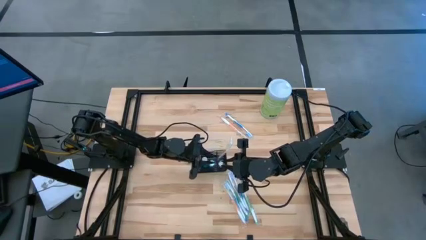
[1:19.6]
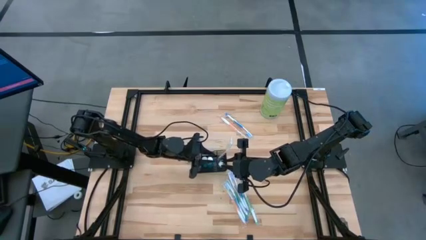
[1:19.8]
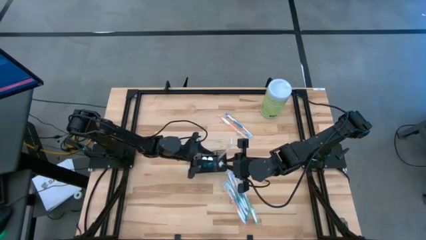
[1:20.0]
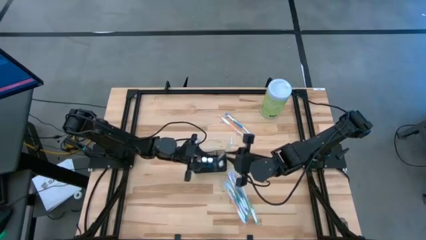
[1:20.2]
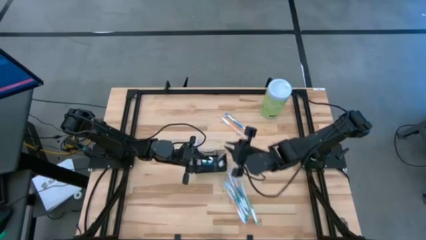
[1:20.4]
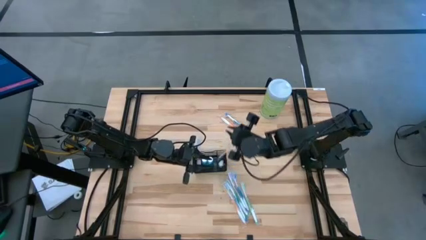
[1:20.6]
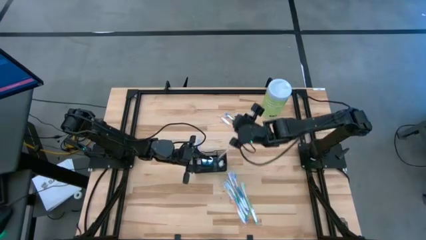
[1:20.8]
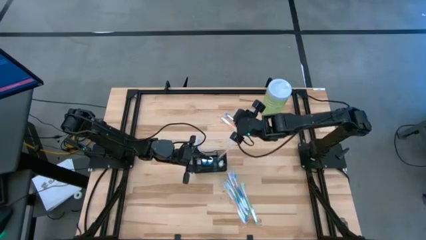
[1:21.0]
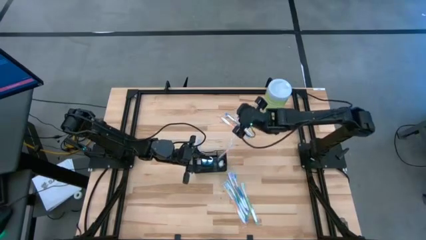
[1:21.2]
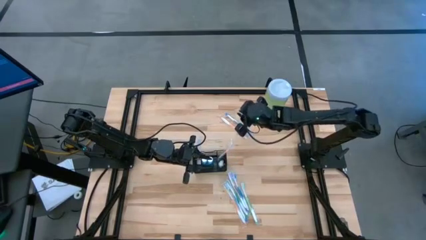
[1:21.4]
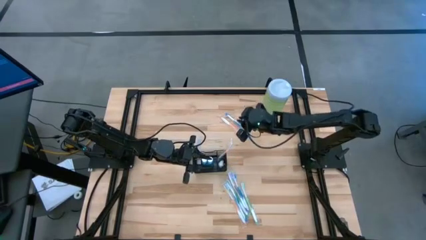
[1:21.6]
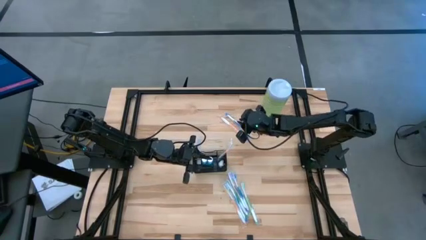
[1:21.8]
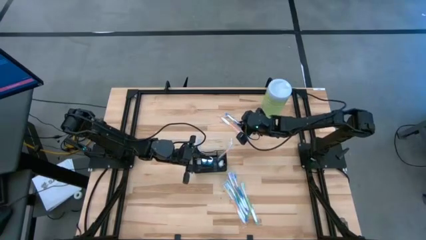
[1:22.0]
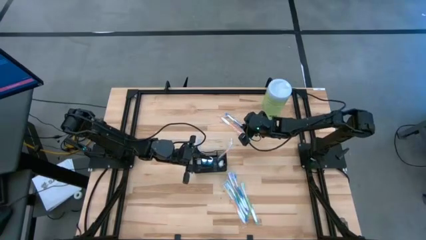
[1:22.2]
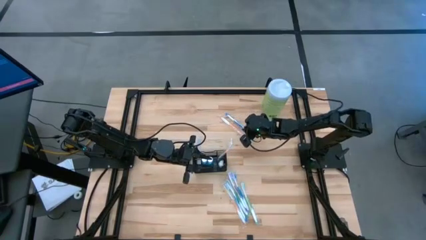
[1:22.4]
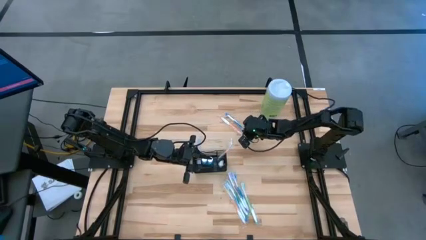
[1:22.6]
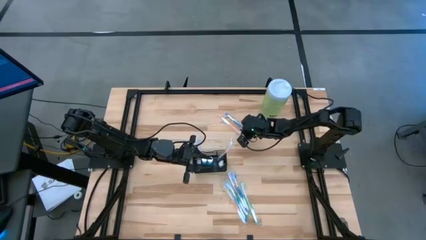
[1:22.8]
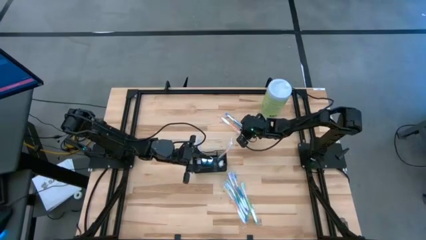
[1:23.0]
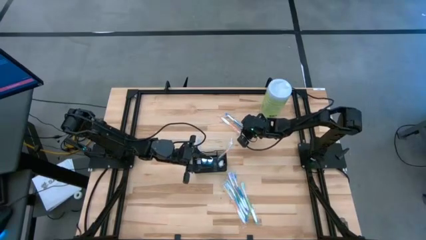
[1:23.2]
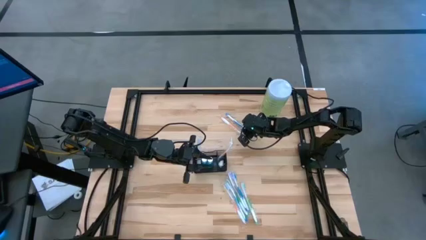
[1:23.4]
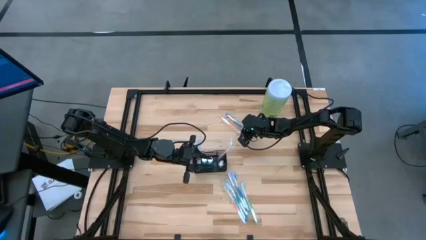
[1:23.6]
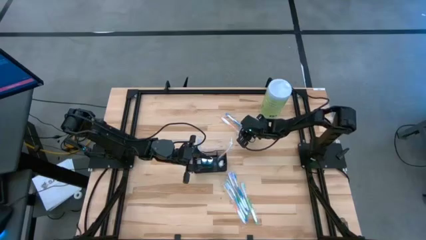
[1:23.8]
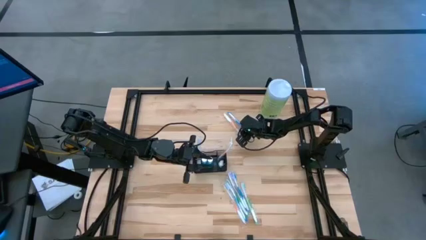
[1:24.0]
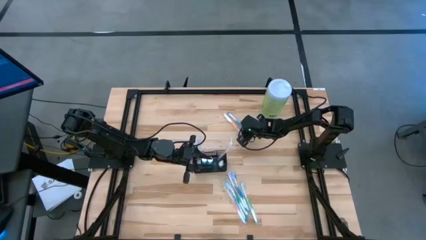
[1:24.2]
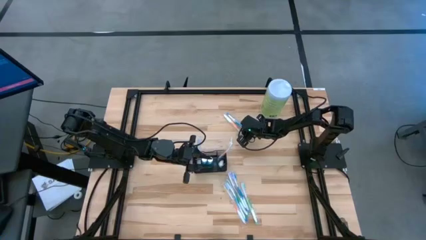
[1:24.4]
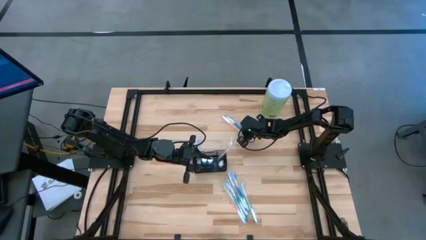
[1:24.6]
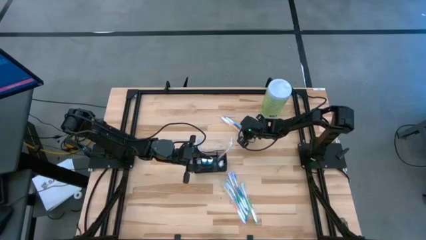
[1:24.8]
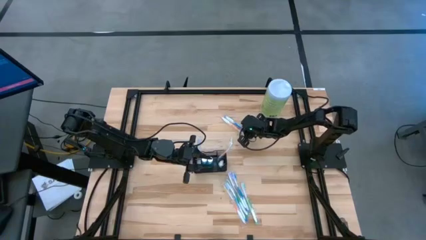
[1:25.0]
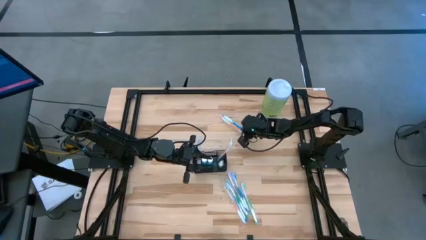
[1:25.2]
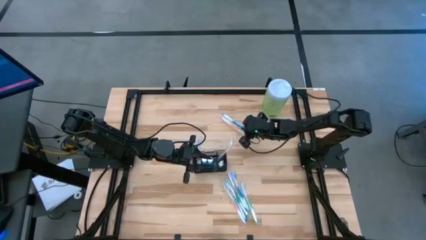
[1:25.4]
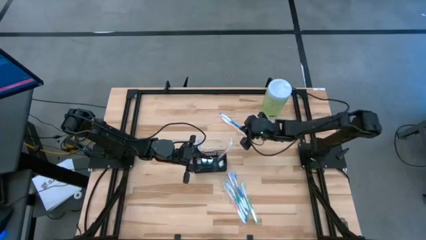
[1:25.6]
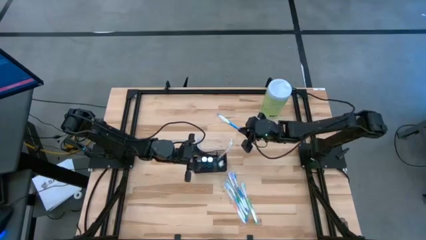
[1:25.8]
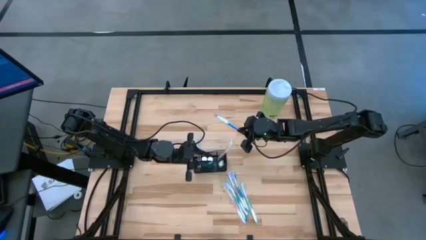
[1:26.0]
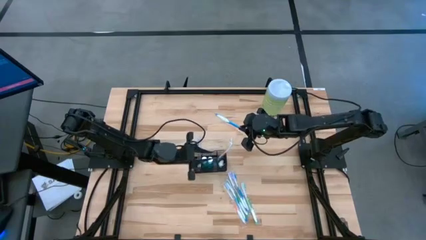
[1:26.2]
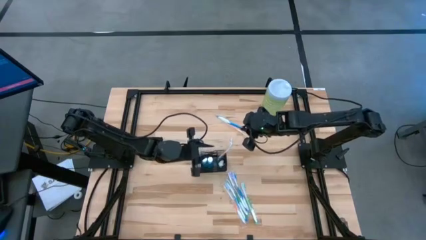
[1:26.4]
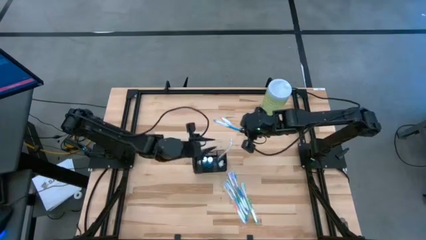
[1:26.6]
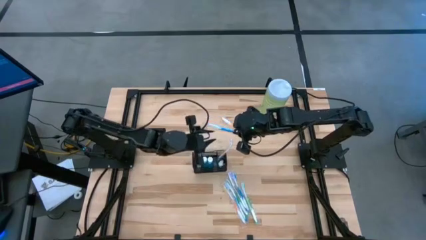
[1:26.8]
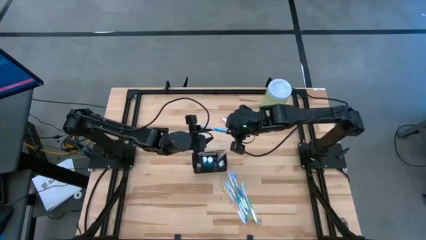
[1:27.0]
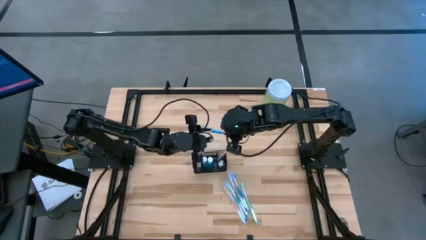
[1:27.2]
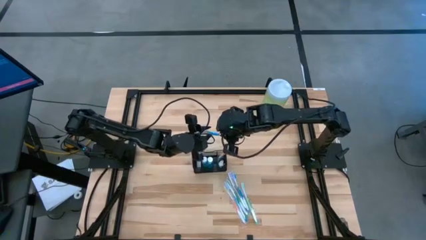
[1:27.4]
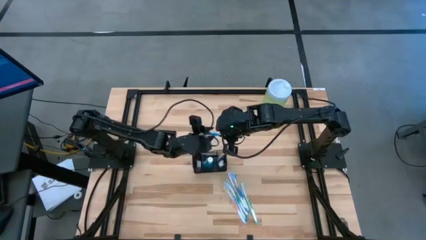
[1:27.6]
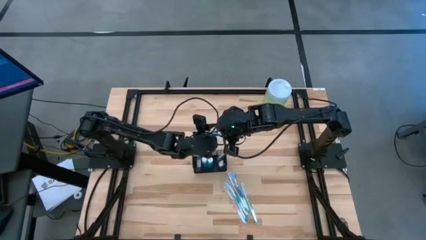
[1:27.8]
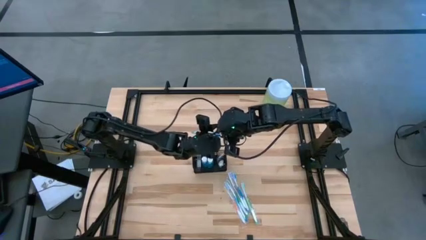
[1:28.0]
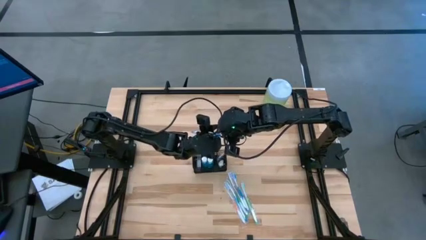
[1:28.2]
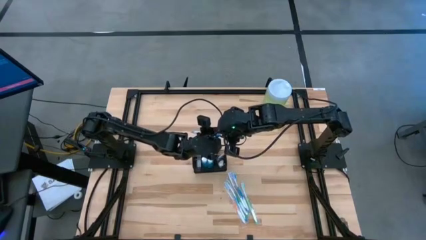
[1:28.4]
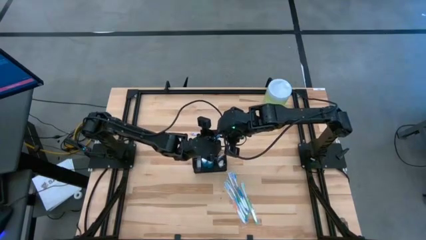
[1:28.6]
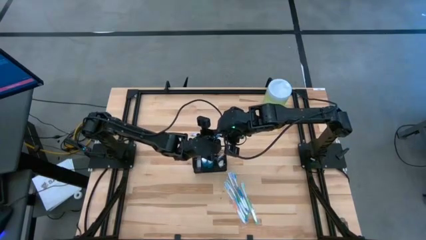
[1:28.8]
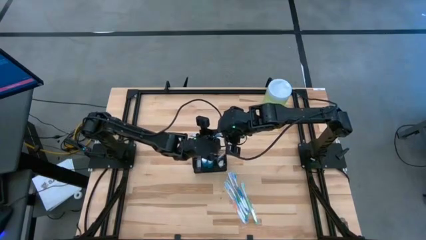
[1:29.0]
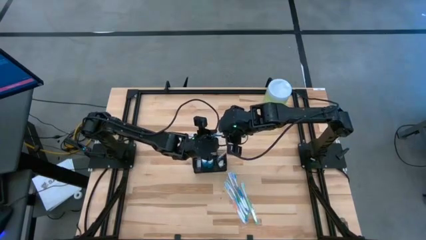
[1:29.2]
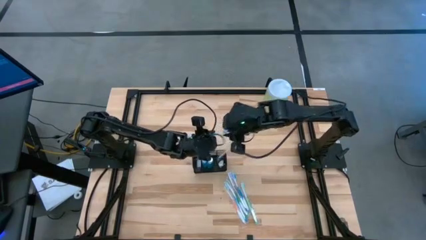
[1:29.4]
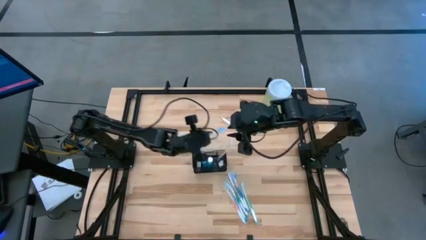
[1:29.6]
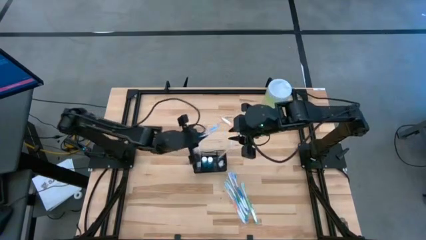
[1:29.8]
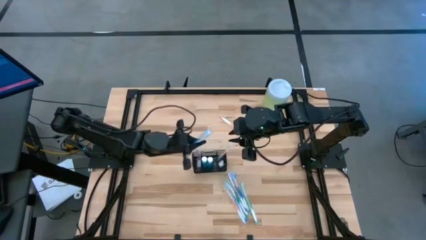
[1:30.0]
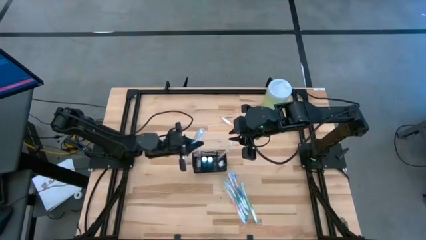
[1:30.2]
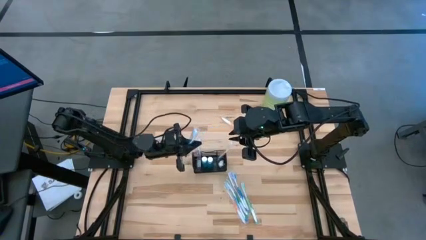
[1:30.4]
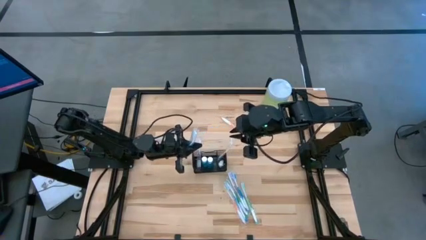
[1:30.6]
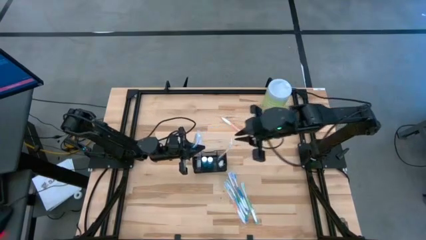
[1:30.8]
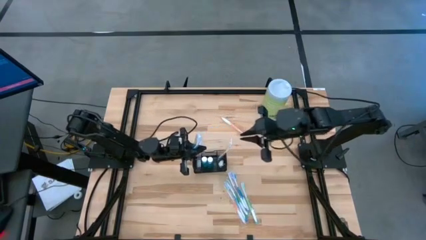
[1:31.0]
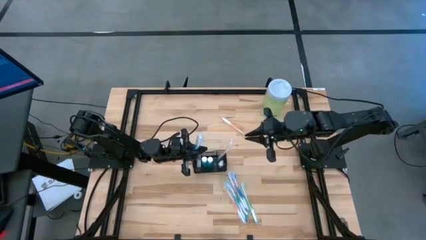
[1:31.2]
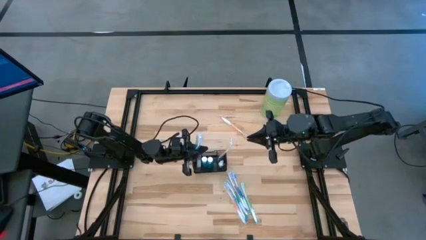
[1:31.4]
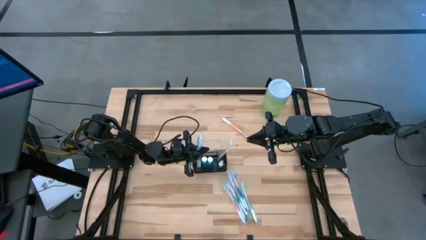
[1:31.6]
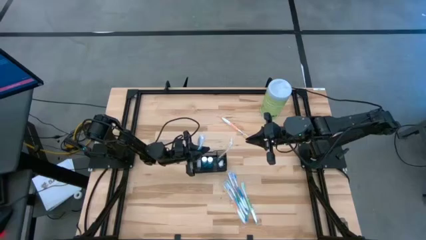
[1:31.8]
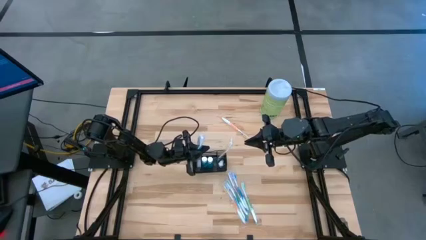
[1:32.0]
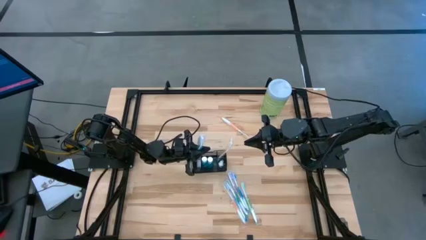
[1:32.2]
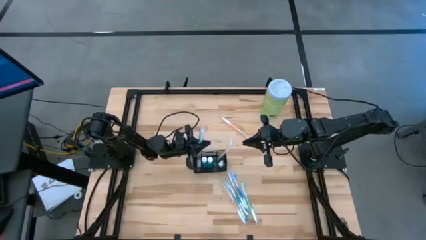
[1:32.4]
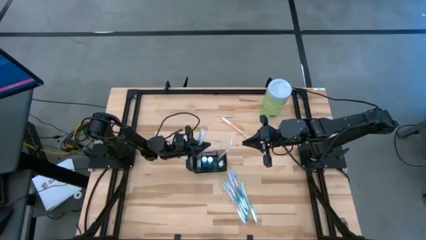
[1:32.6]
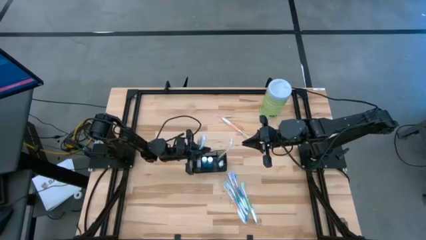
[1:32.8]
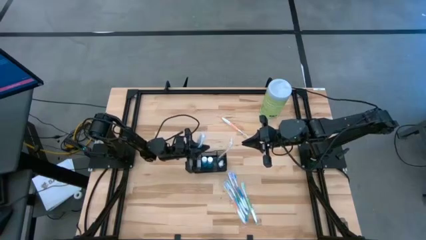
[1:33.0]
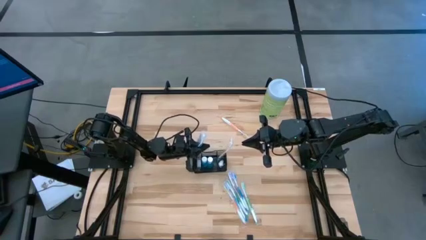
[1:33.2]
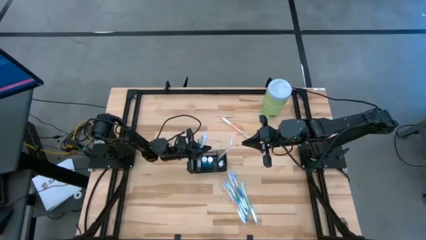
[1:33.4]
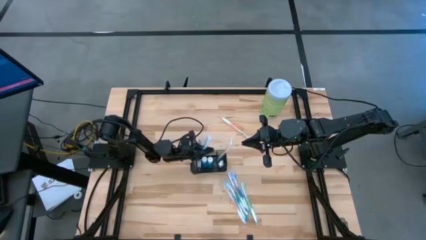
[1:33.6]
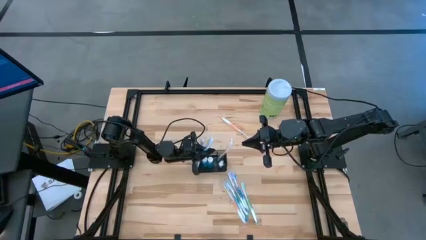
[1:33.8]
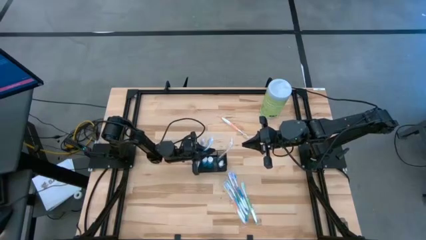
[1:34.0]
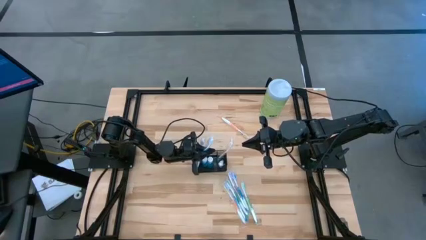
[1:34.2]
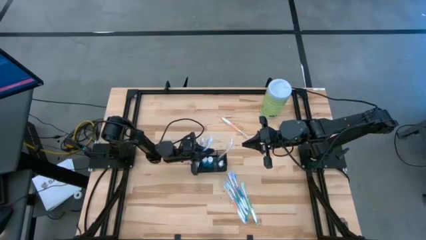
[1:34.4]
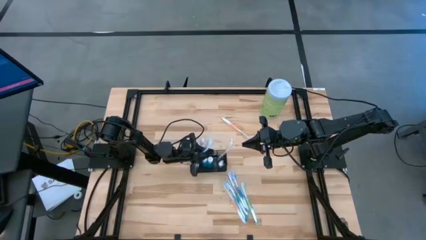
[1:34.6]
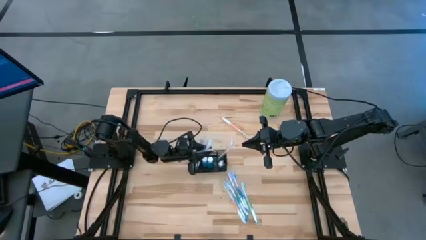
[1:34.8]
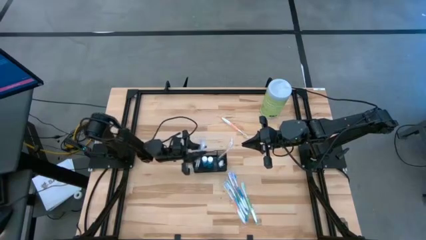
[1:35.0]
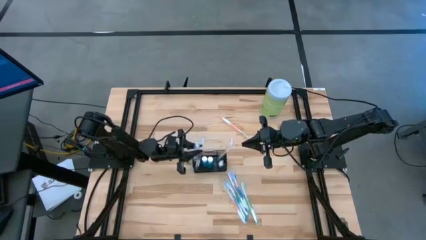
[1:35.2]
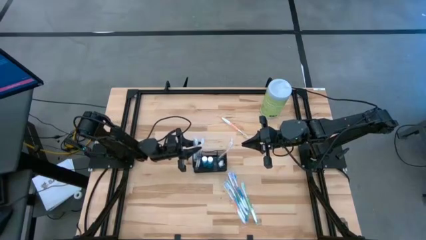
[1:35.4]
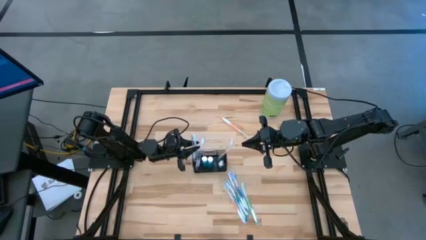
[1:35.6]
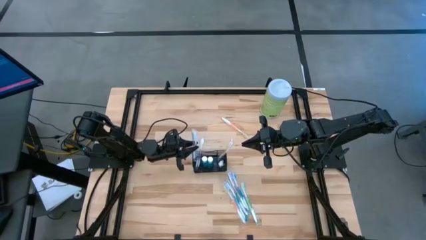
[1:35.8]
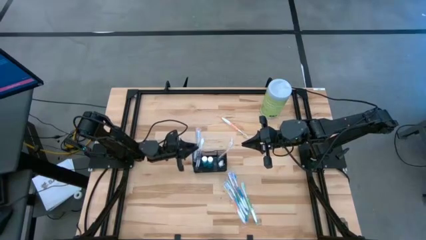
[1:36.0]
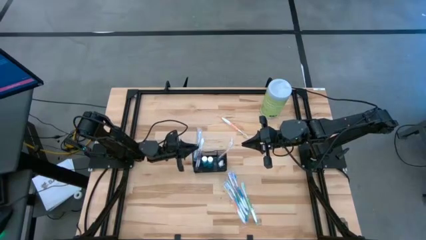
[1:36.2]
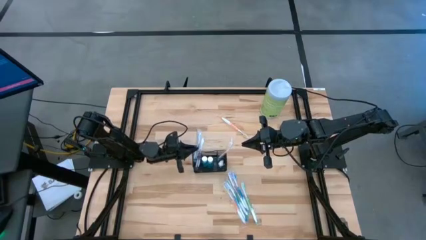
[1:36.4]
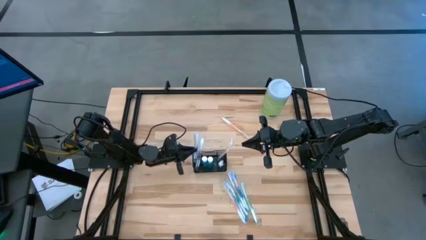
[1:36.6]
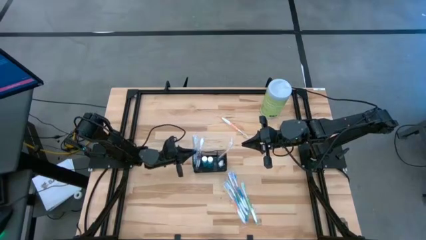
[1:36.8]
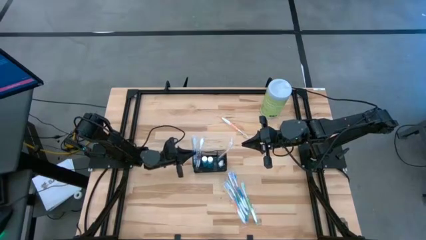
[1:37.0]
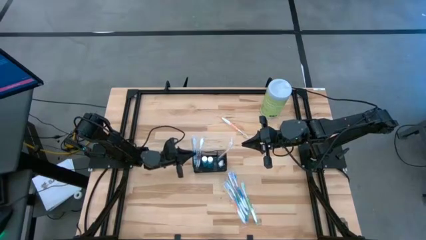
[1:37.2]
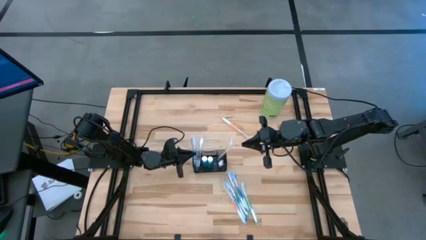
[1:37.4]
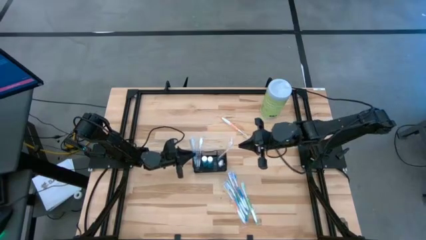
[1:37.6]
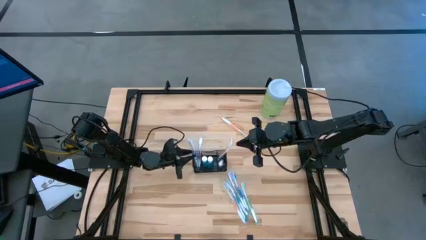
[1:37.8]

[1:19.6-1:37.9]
Task: Pick & Place toothbrushing station
Put the blue toothbrush into the mesh
